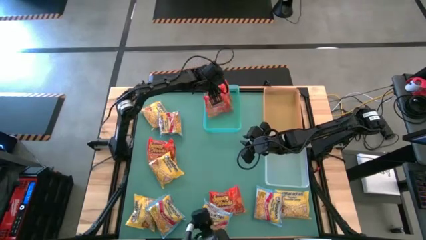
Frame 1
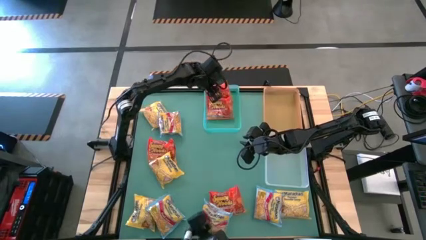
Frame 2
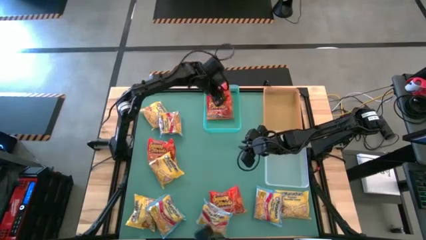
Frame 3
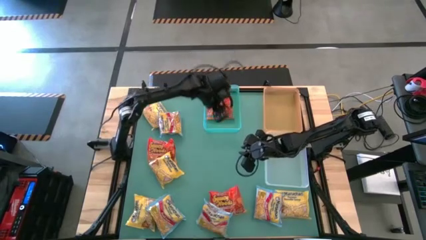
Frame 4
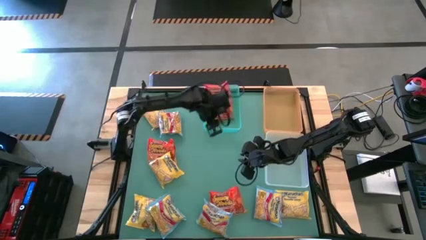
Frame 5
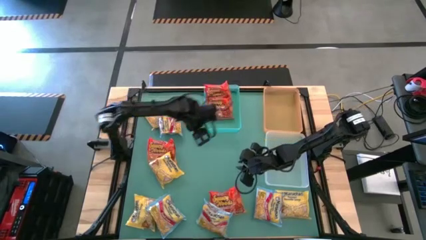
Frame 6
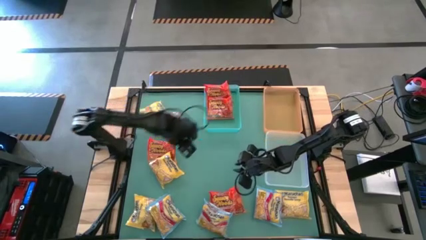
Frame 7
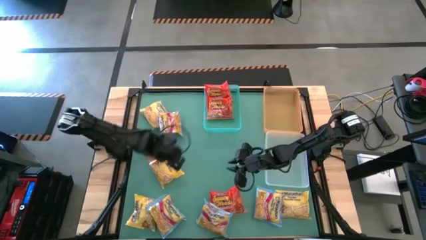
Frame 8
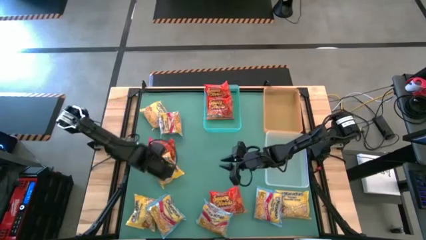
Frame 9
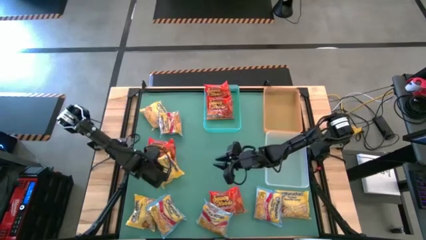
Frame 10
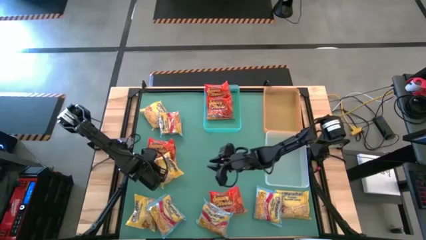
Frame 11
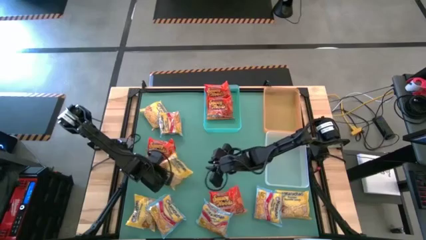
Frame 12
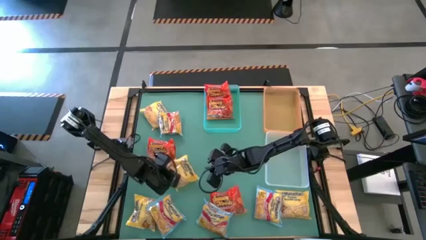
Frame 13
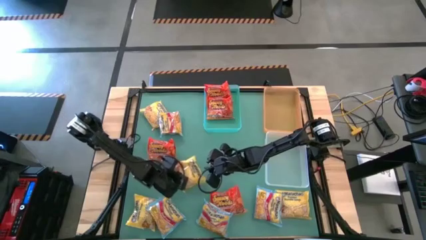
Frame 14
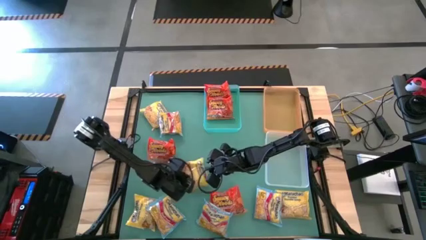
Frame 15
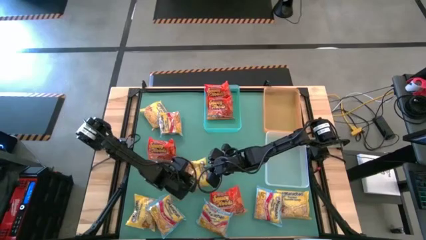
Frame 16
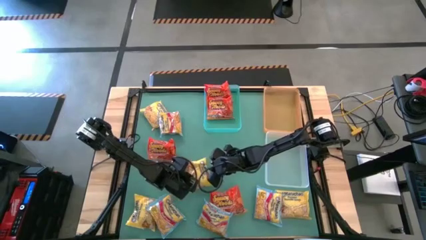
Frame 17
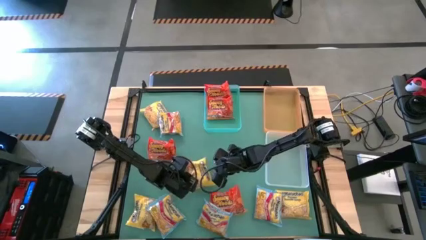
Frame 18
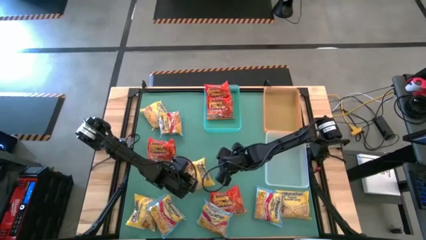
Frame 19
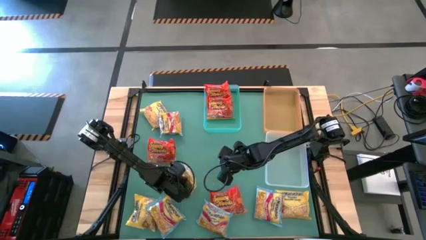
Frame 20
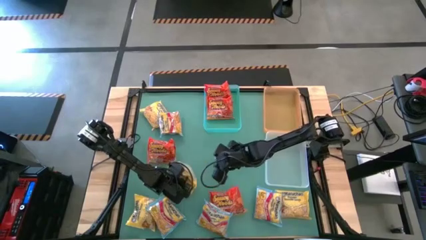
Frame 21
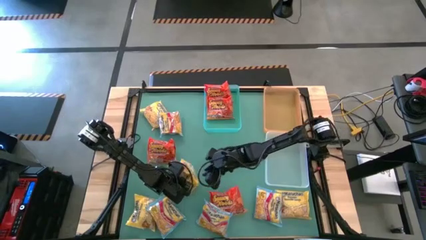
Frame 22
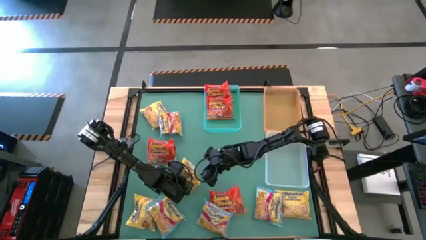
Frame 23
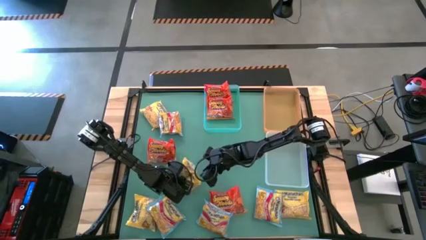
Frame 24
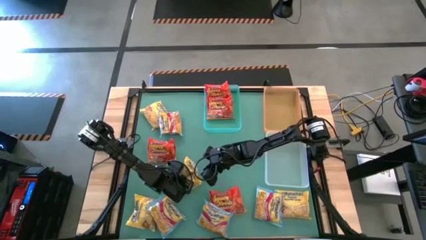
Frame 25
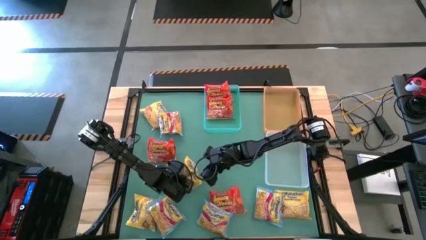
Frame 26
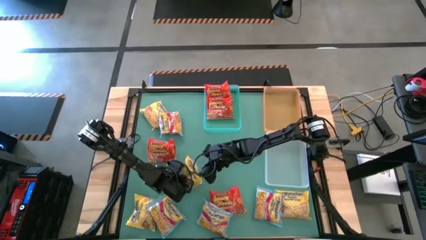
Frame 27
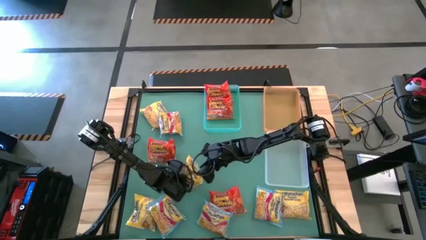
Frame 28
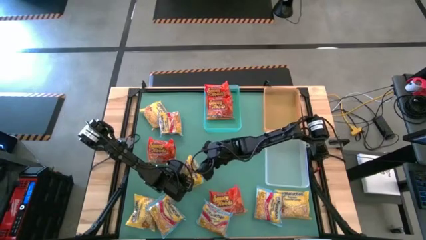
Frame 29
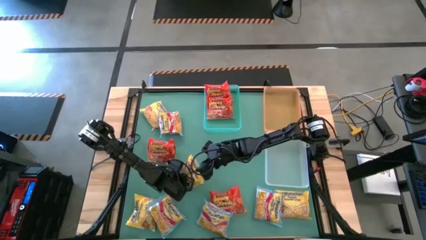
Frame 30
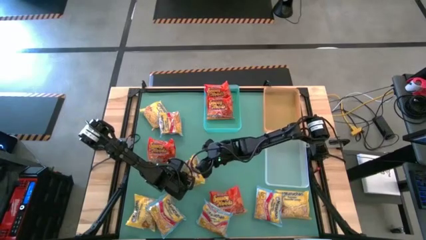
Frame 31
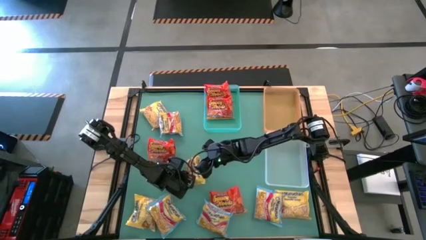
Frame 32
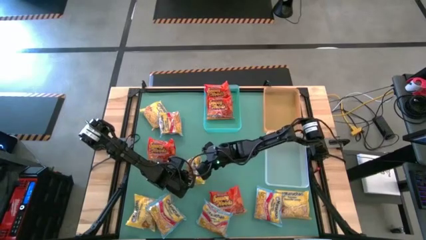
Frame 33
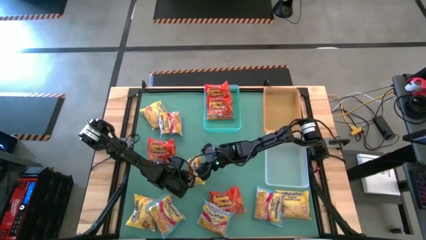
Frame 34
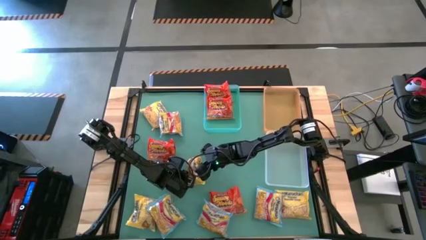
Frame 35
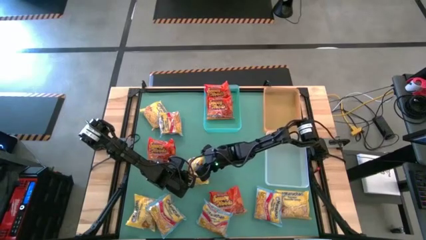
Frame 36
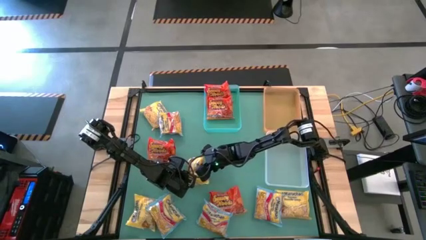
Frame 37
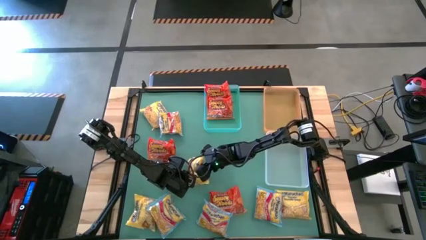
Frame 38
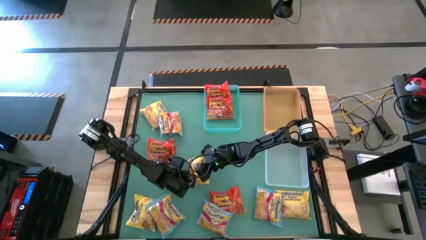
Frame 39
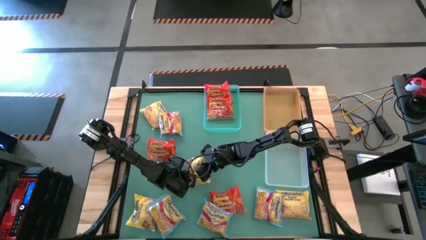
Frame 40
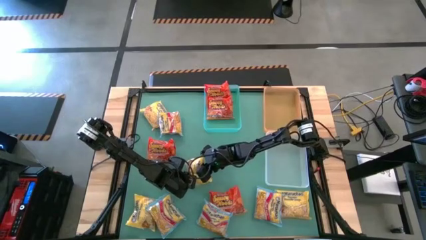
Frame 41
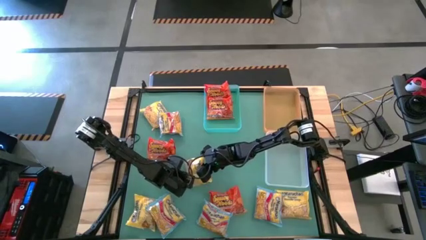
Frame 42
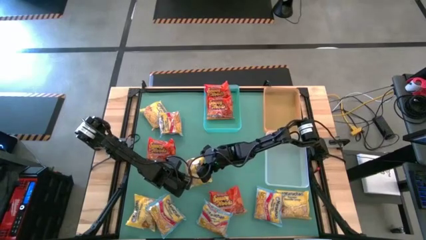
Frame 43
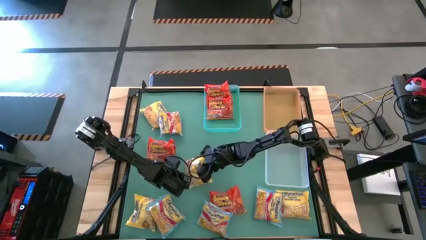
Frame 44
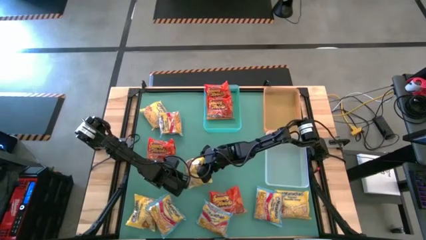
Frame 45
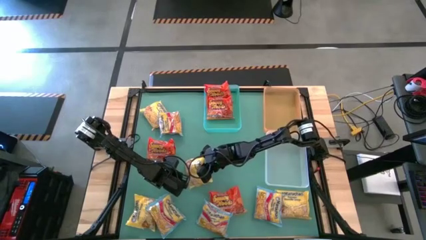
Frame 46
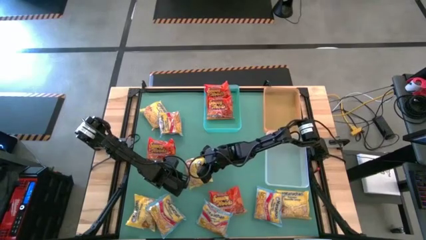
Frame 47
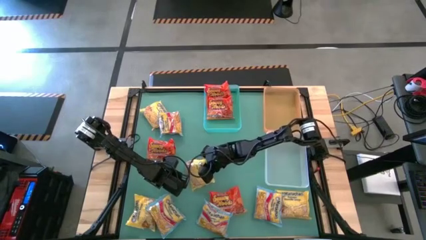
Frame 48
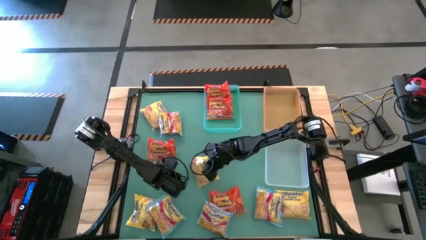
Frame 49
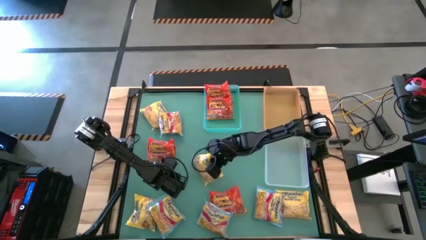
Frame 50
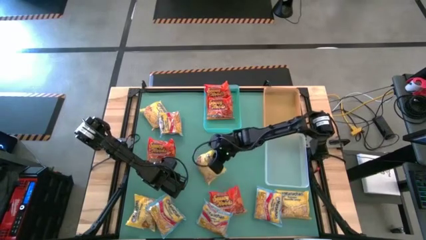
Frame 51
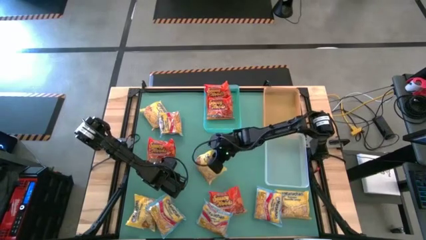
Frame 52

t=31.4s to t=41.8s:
Task: Sort Maruchan noodles
Put the yellow noodle pack into the orange bin
